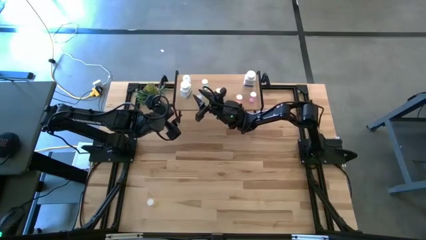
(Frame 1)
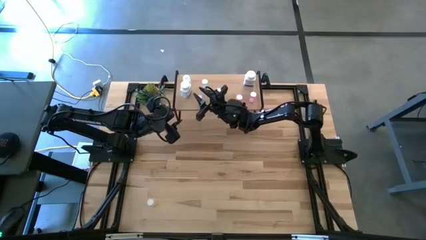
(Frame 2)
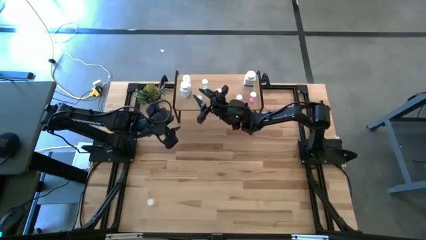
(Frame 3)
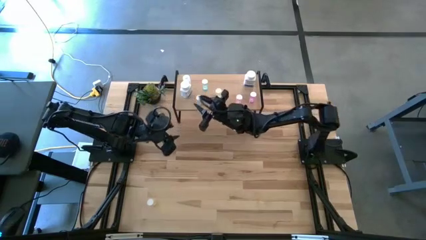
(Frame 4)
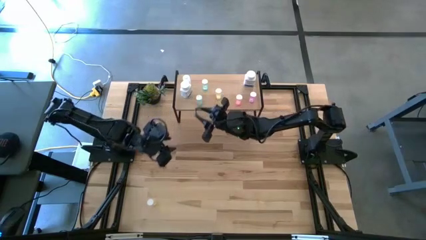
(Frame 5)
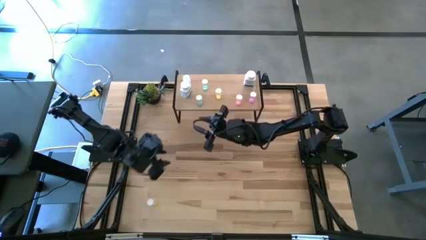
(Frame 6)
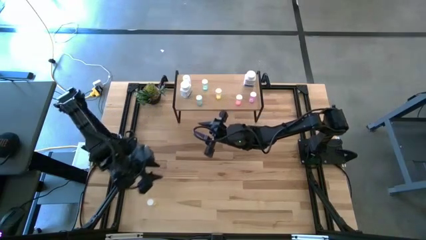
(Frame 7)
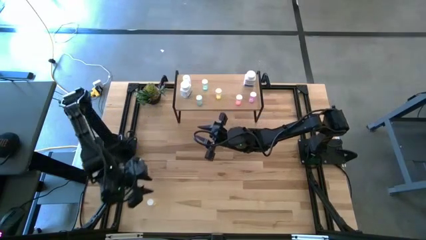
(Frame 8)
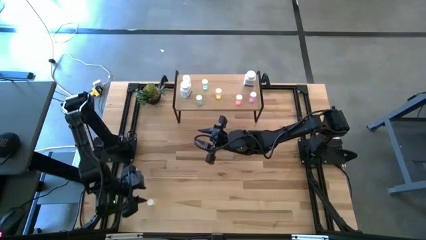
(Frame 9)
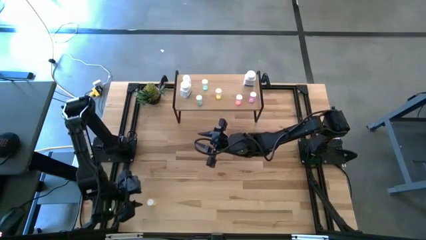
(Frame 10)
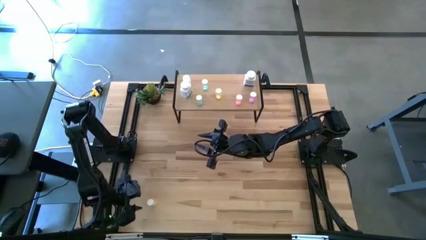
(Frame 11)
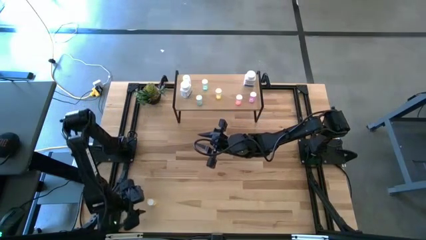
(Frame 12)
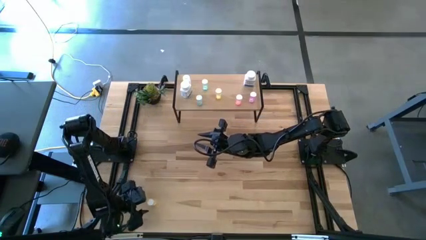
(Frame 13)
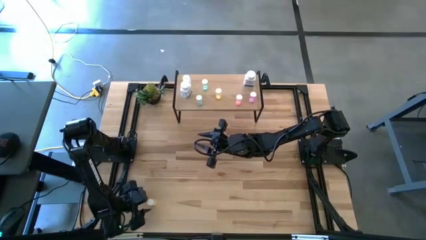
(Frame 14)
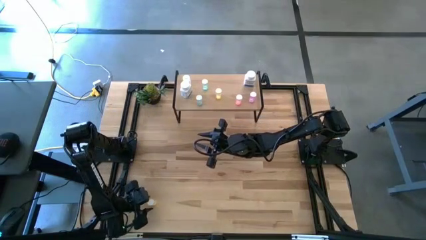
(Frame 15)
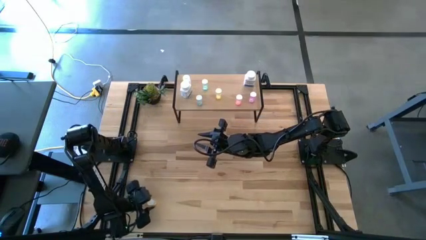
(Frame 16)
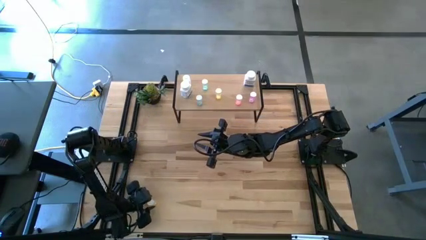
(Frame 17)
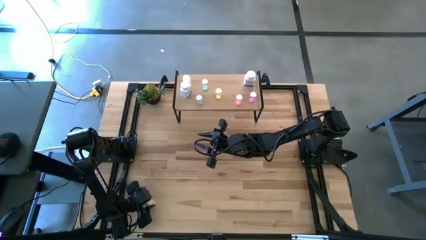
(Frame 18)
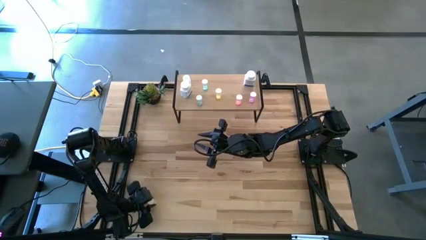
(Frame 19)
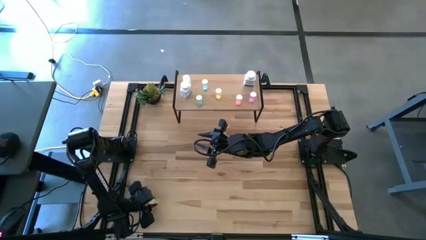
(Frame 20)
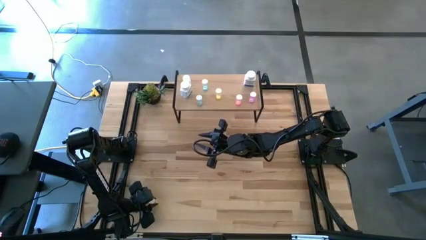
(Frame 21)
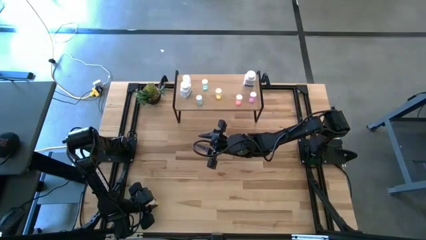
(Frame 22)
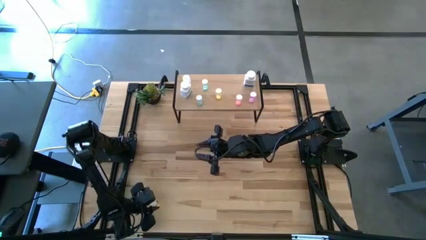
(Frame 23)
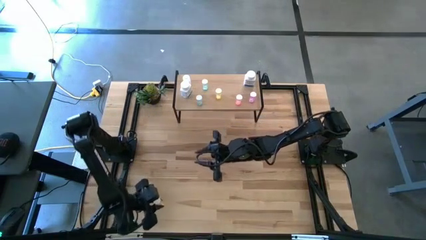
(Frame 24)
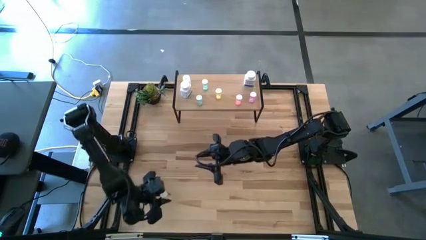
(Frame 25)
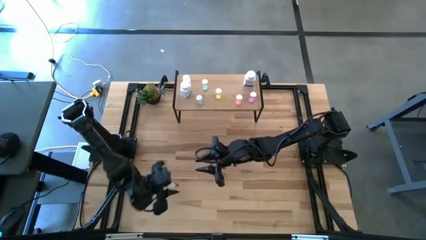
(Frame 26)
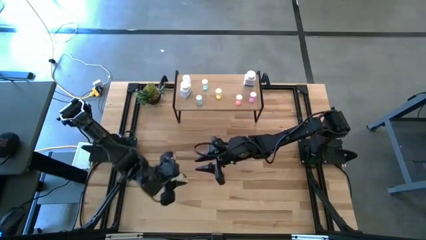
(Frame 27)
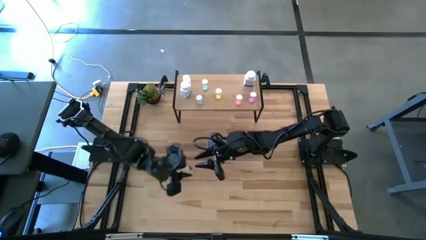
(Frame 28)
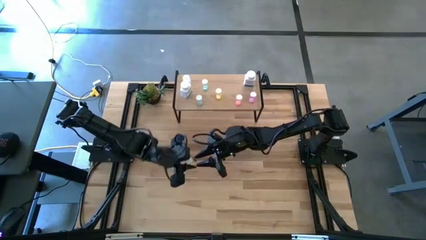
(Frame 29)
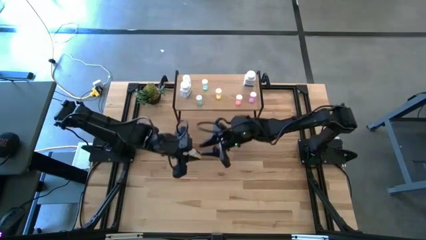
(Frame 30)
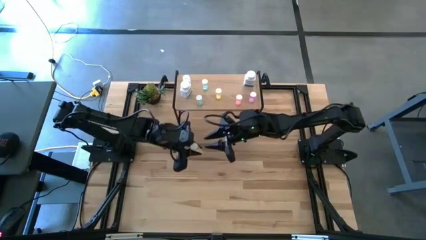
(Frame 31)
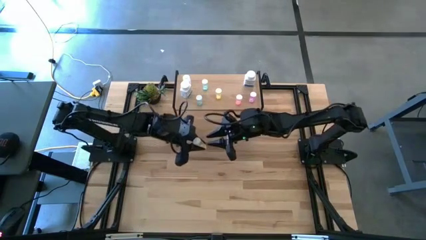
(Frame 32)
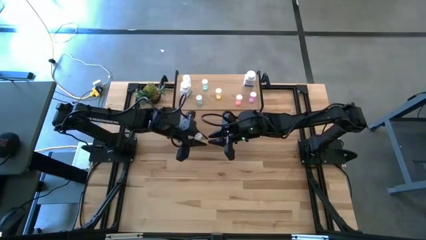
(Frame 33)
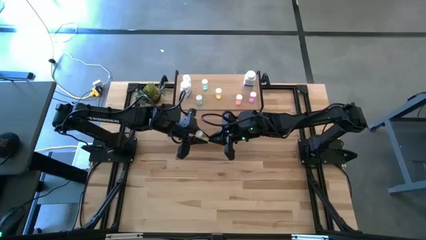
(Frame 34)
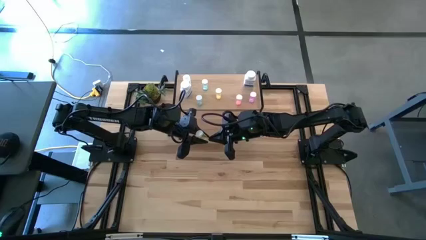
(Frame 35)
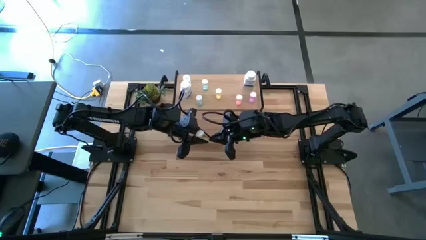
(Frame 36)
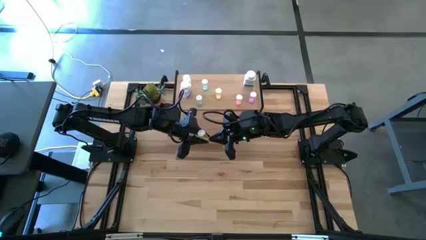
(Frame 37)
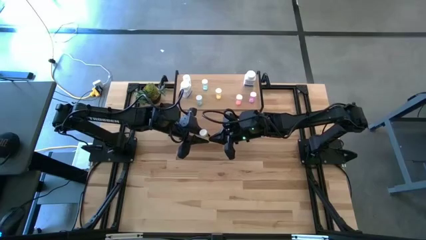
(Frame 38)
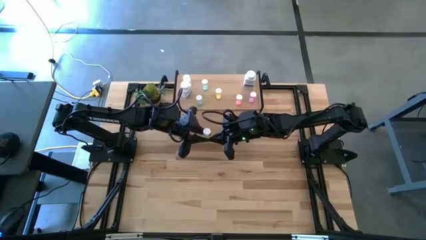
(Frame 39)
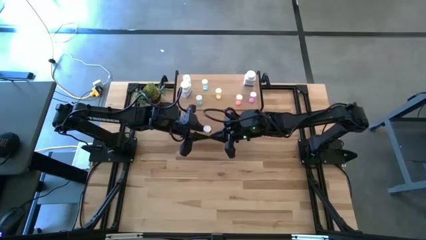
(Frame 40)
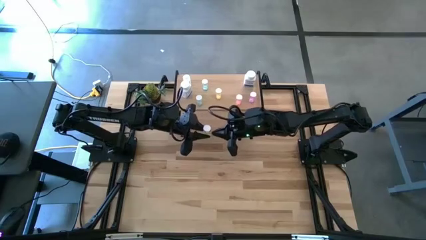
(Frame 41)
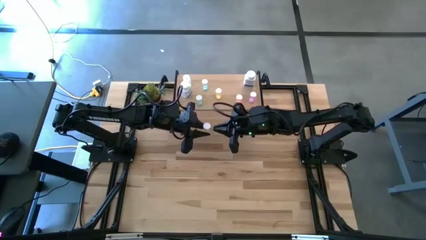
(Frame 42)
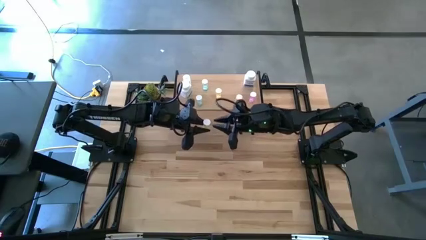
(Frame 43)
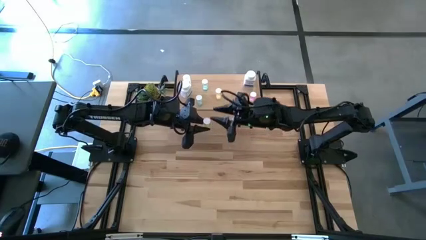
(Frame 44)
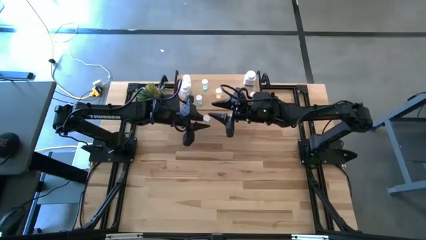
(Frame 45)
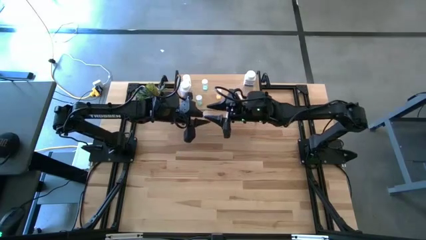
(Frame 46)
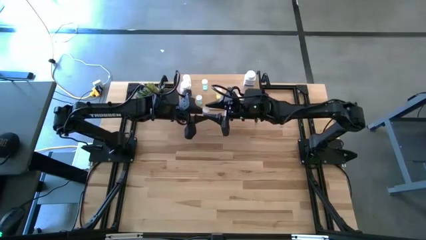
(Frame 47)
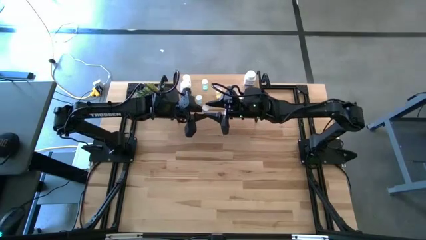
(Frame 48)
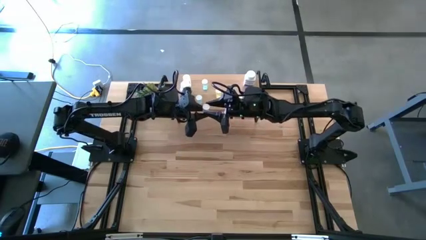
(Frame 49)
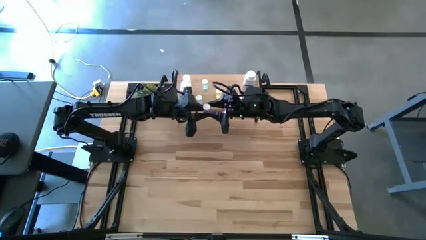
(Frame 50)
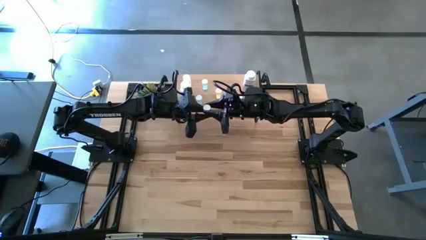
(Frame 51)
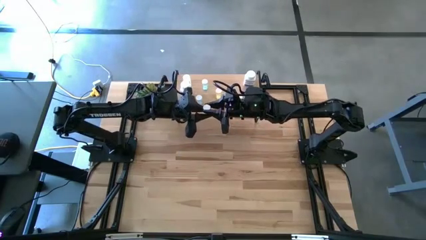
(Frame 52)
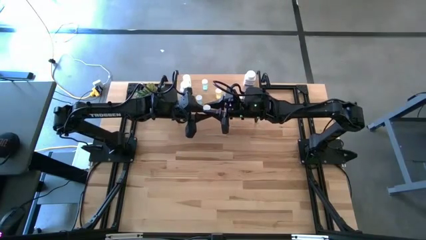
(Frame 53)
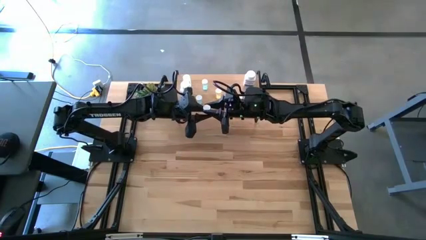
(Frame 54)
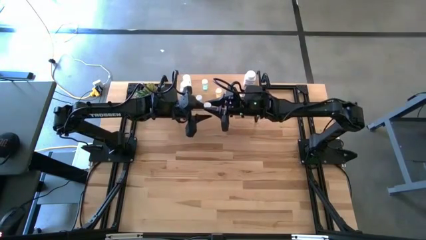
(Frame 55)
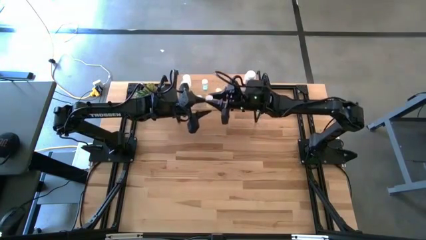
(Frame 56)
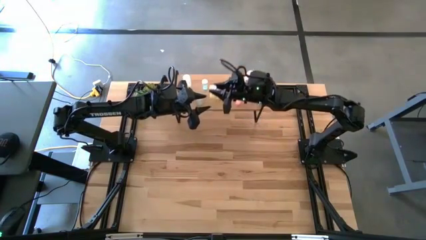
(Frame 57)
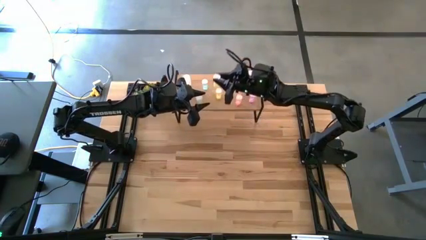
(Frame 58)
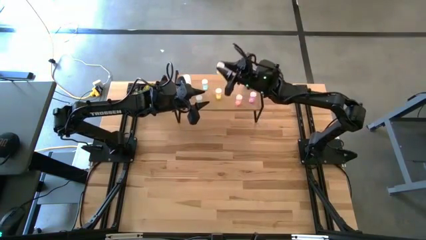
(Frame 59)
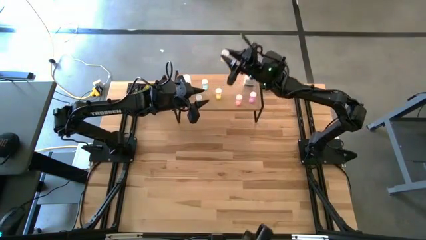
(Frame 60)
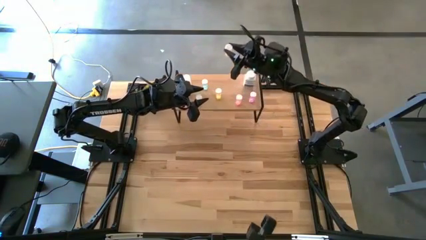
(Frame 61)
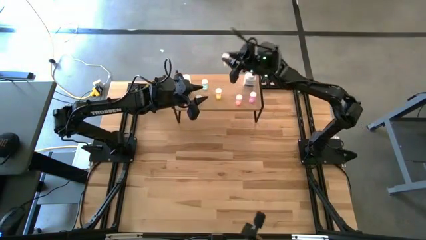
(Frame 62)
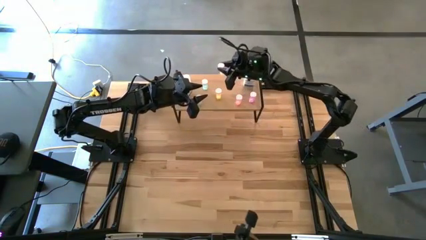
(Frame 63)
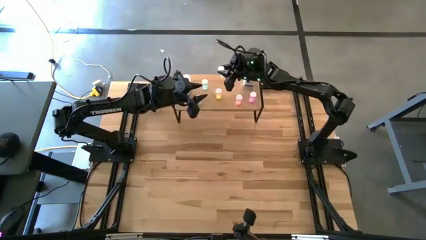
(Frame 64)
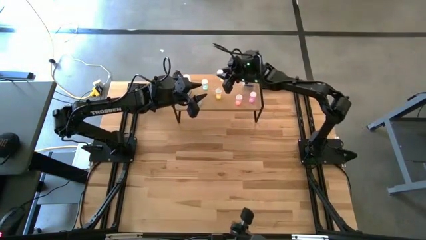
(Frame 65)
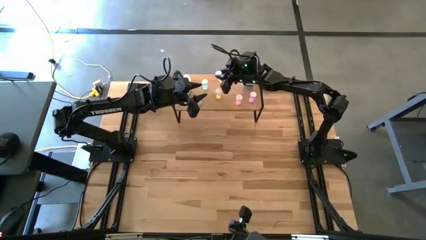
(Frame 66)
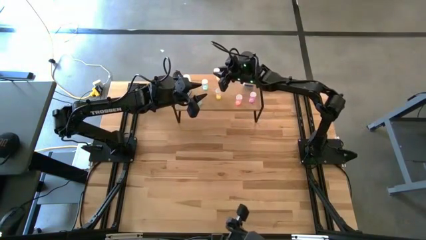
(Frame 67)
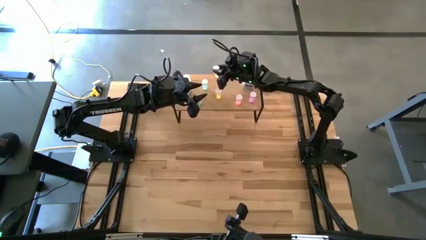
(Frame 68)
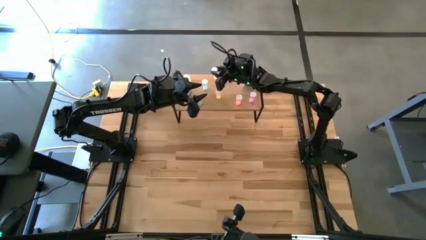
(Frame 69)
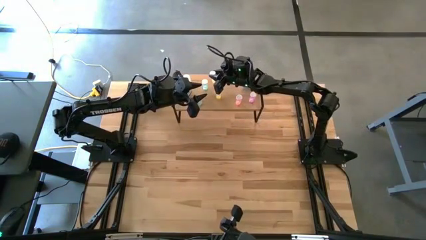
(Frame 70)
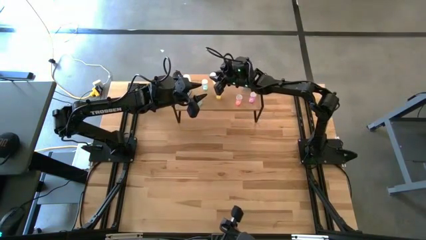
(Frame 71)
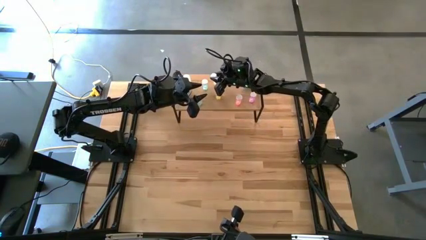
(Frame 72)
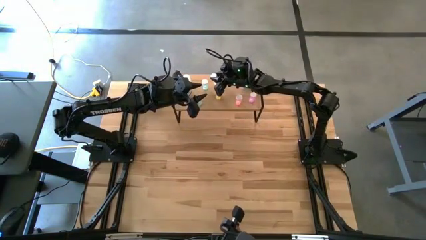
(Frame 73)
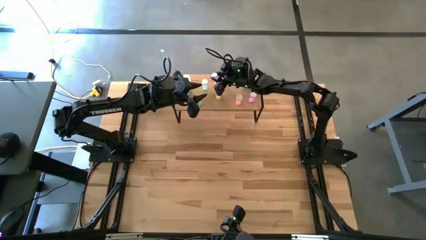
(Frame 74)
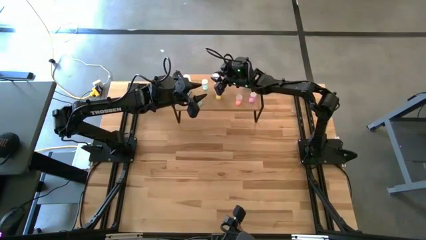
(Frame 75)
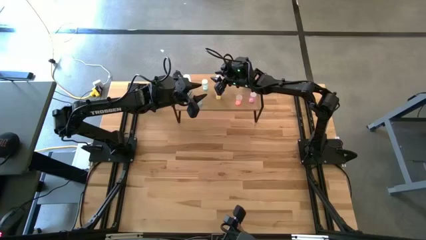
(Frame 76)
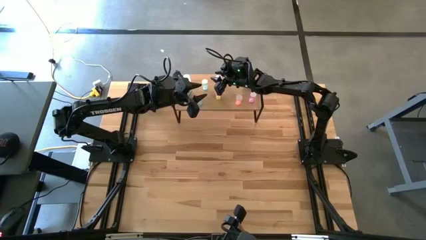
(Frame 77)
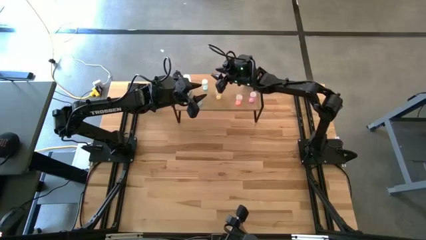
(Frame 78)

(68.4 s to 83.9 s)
Task: Pick and place medicine bottles onto shelf by color
Put the yellow pill bottle on the shelf
